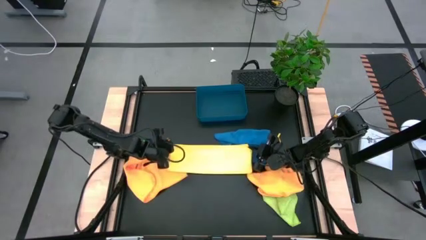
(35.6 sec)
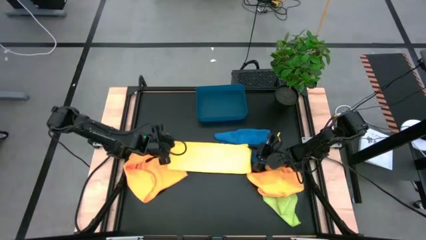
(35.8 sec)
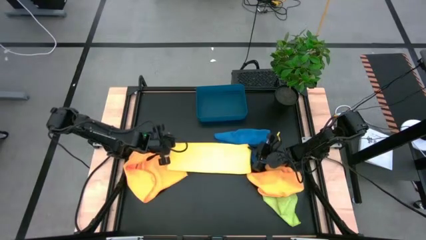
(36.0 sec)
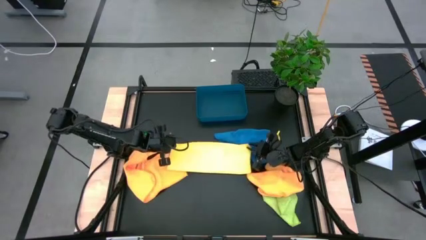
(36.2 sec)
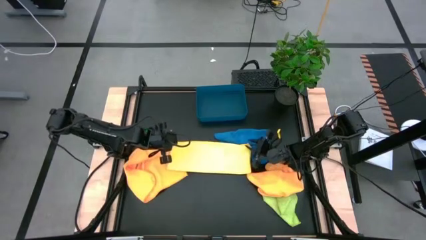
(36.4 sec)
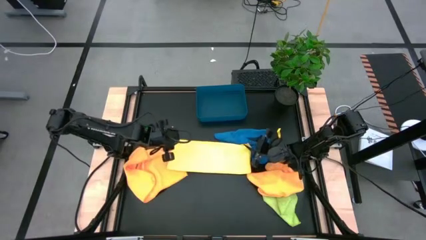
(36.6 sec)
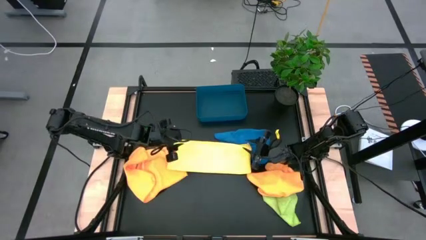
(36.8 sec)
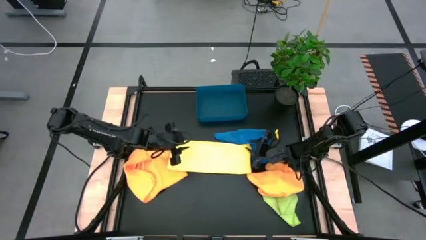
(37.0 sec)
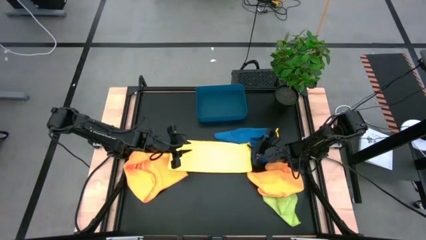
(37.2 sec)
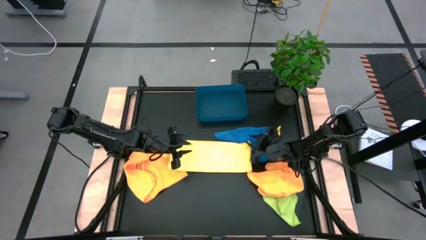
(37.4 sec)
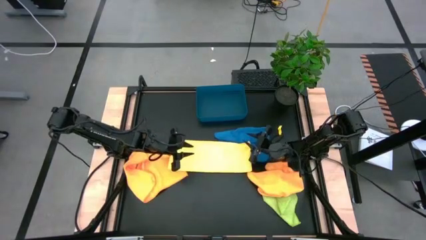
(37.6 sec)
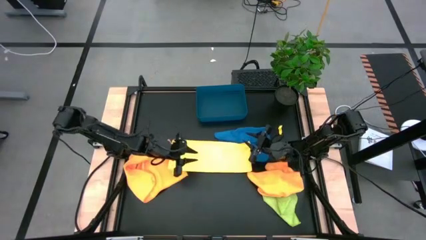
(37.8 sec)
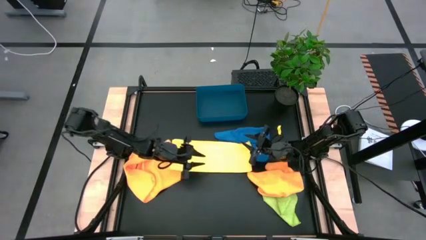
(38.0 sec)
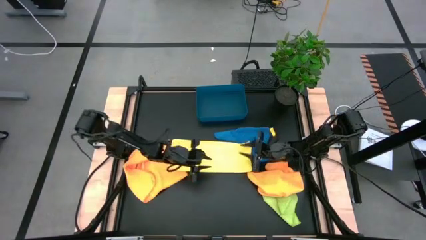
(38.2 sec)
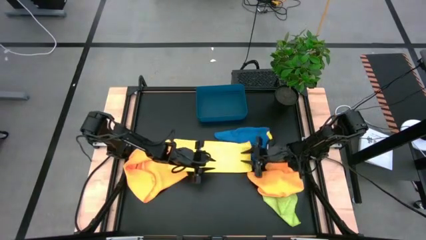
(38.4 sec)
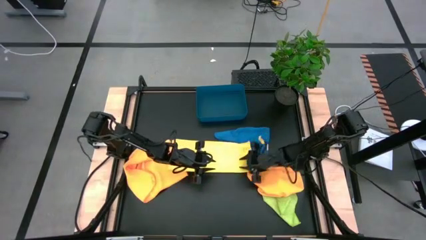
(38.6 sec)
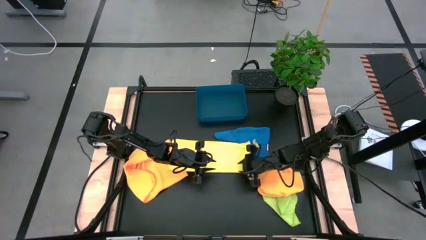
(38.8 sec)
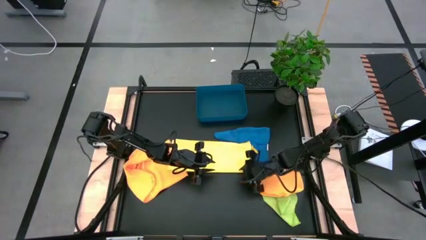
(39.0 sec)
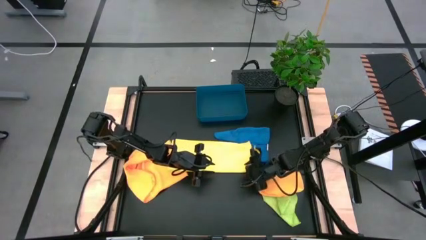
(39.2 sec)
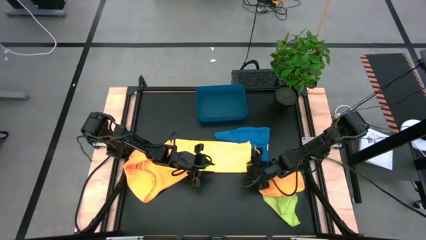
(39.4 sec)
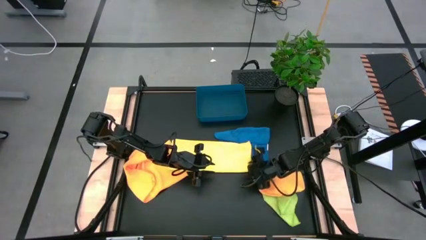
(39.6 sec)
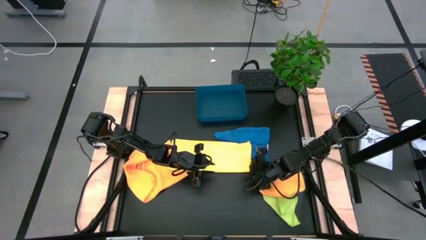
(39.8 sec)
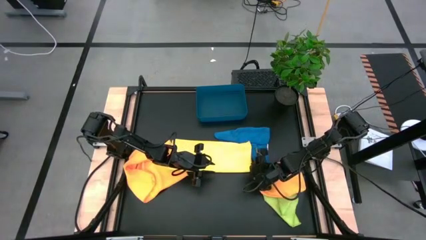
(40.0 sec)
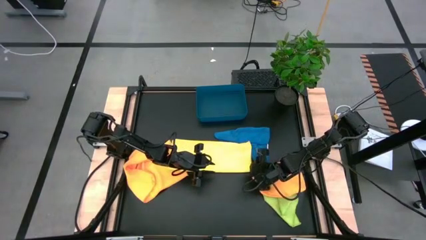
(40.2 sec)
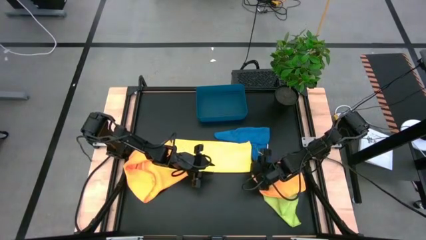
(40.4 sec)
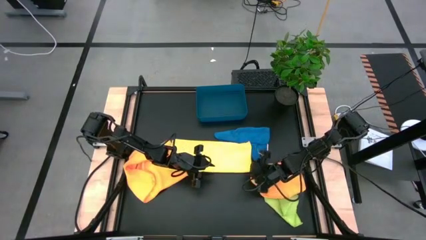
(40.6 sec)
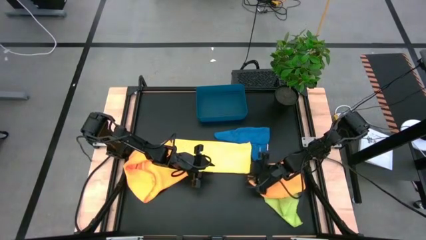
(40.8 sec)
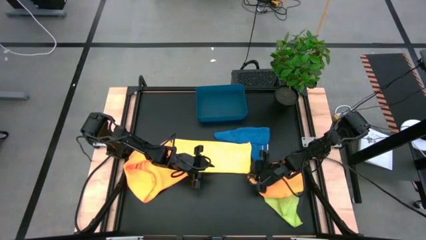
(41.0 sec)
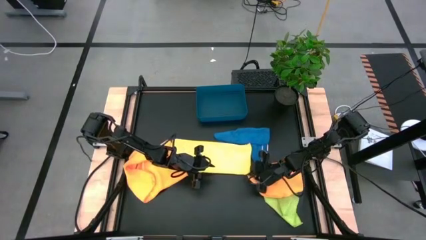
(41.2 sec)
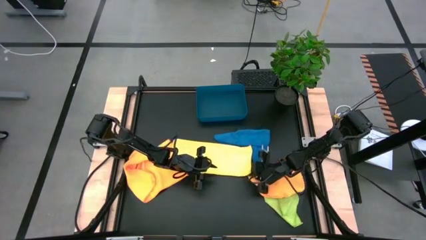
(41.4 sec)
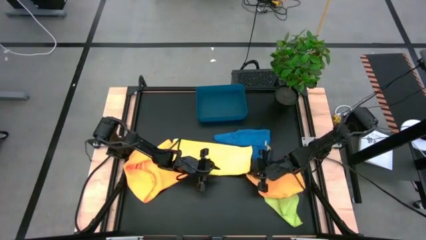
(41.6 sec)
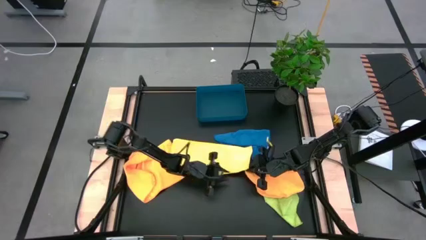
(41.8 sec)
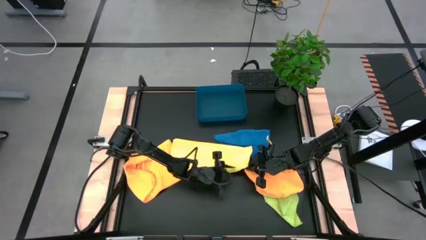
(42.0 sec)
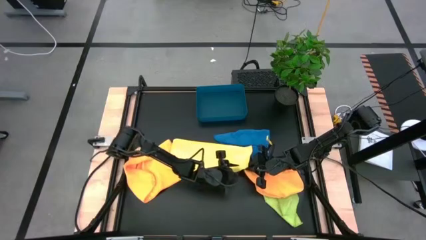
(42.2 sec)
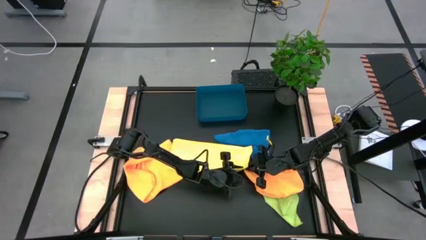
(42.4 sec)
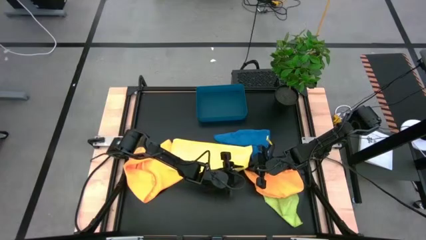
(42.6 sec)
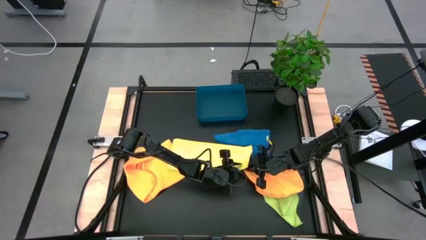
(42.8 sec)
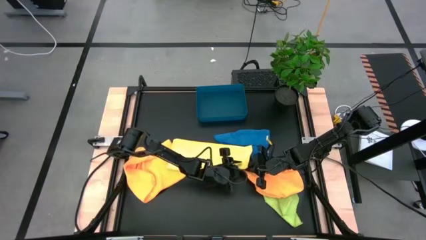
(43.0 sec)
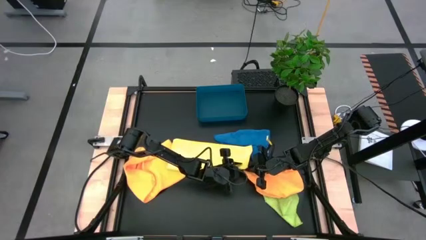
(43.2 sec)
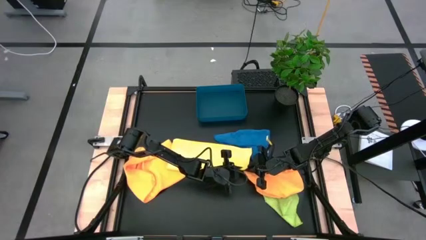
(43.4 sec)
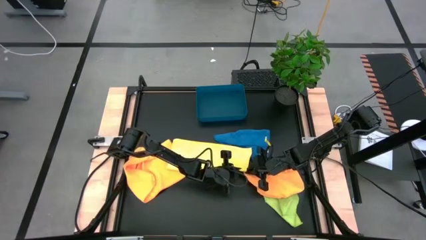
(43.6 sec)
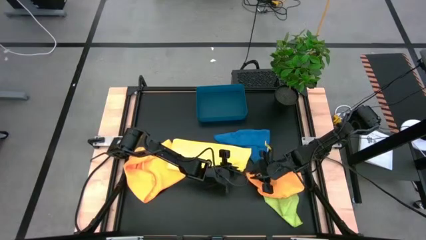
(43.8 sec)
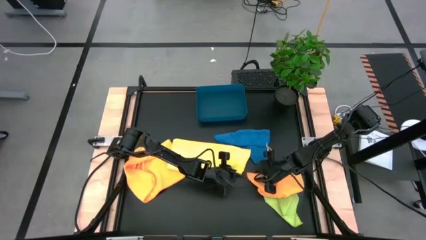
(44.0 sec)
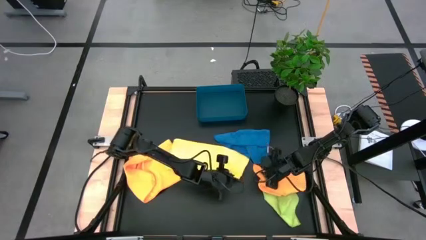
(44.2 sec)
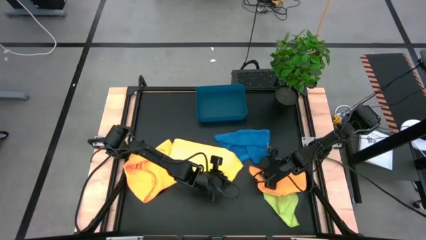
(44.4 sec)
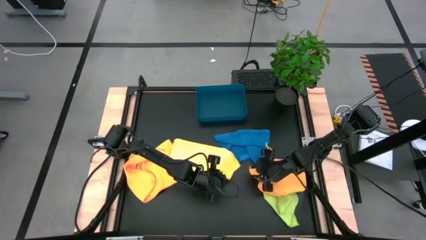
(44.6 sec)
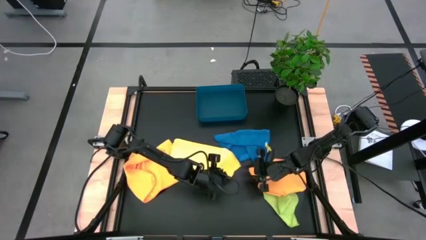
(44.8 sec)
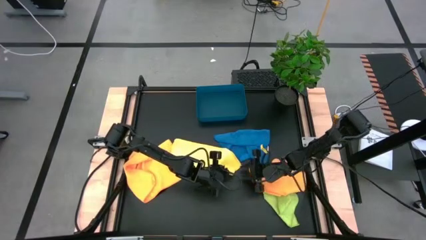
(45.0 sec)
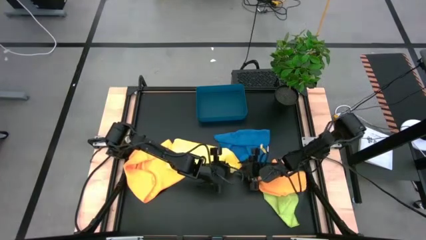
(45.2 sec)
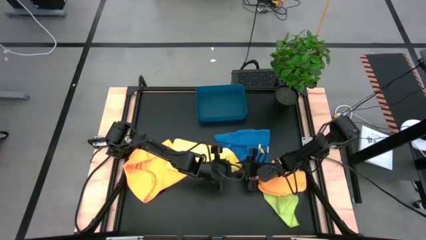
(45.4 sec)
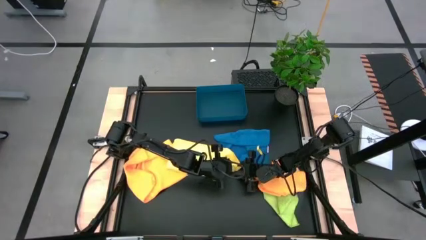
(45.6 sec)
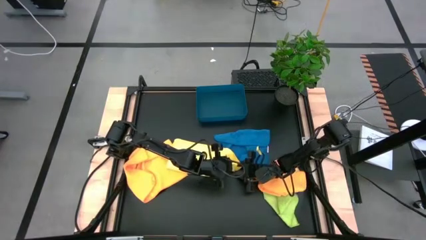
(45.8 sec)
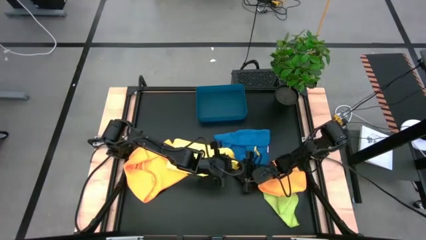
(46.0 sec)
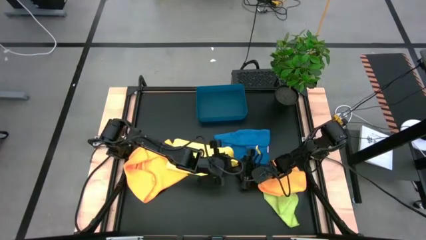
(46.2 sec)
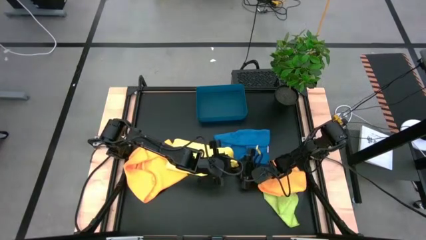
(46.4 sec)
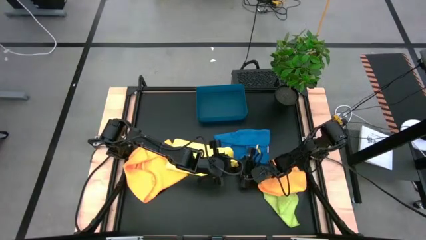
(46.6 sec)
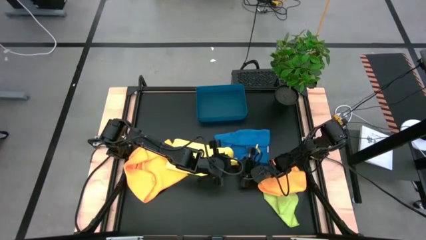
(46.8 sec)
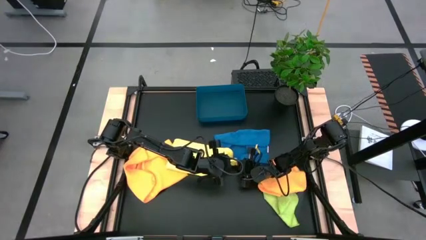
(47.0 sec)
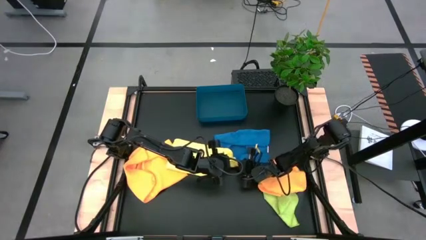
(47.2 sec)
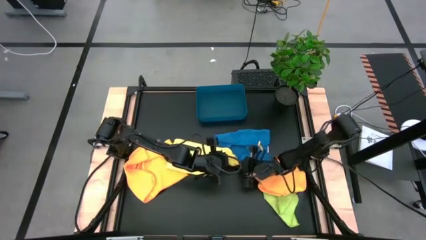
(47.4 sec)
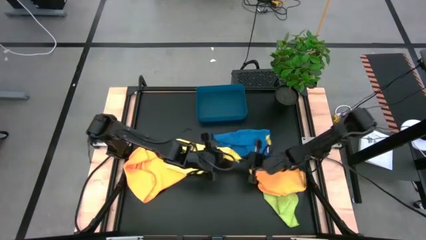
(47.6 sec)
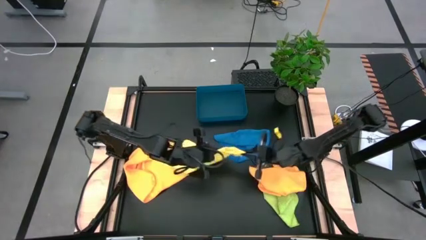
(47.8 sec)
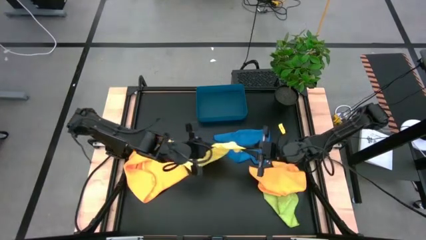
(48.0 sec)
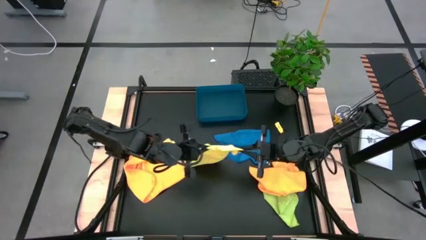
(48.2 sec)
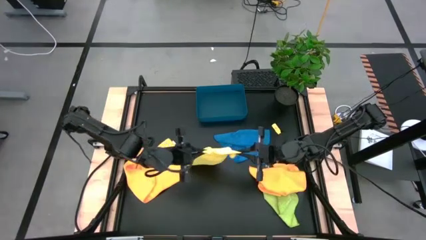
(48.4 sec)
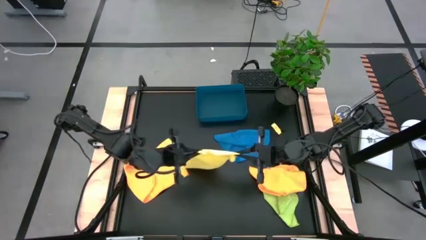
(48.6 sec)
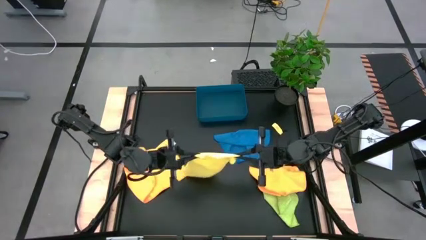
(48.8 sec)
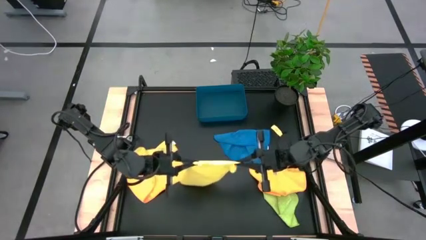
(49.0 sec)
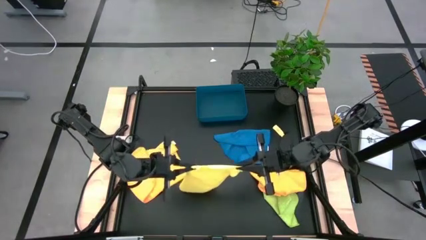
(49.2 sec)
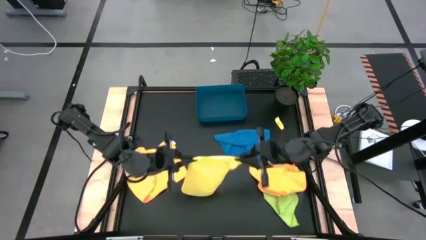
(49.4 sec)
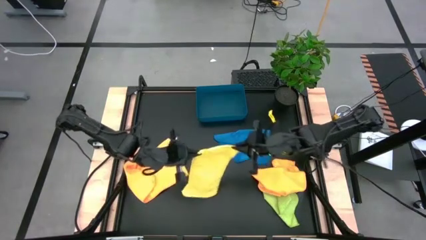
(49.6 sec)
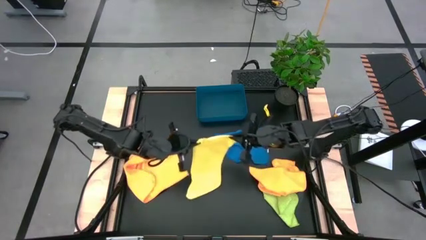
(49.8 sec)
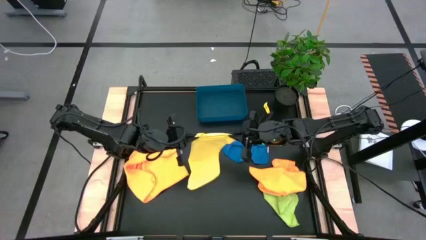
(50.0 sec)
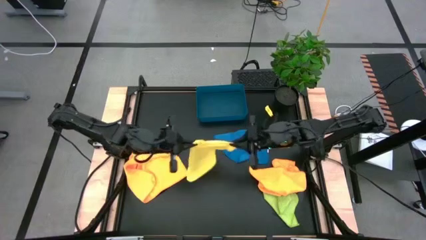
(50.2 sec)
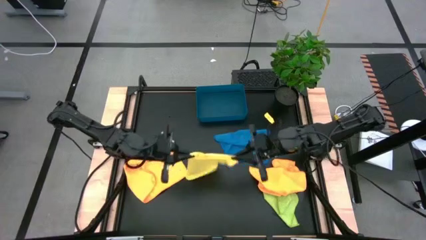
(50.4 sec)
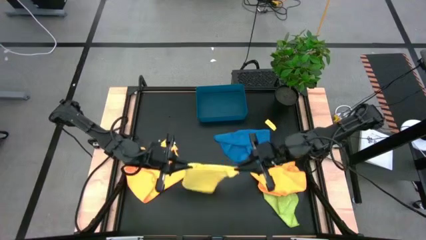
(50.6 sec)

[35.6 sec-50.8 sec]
Task: Fold microfiber towels
Fold the yellow microfiber towel

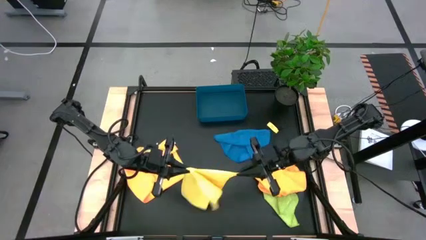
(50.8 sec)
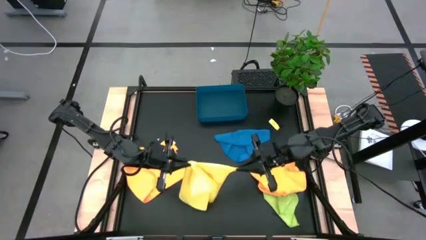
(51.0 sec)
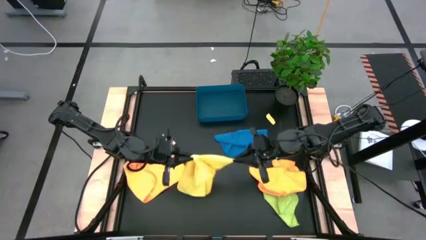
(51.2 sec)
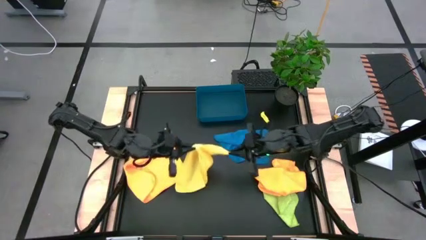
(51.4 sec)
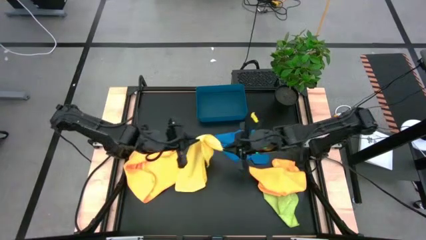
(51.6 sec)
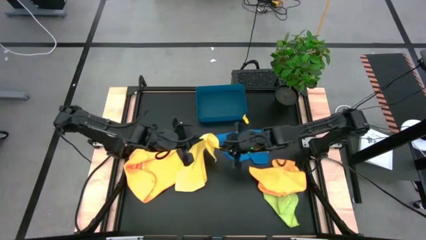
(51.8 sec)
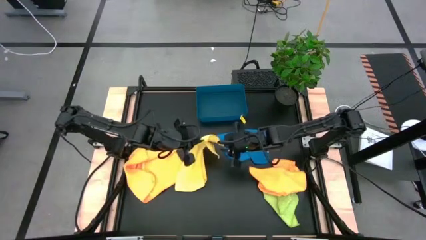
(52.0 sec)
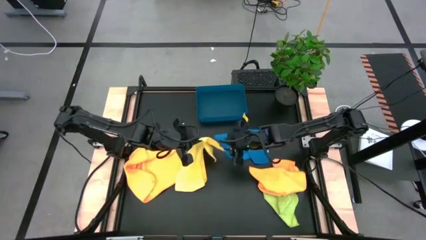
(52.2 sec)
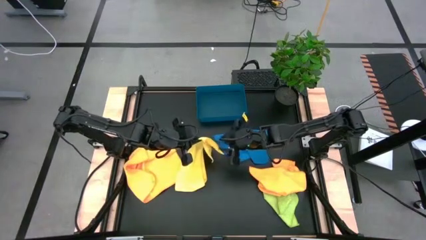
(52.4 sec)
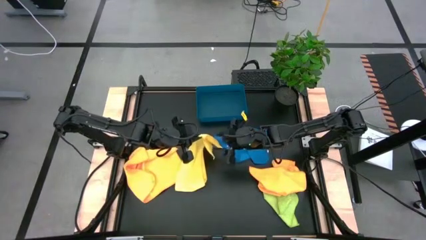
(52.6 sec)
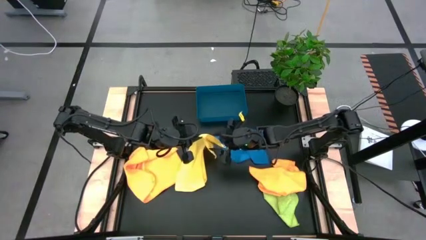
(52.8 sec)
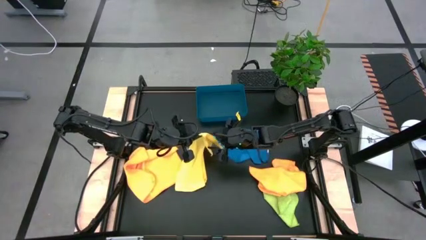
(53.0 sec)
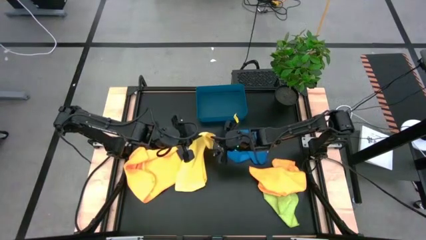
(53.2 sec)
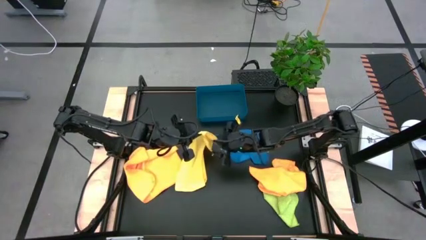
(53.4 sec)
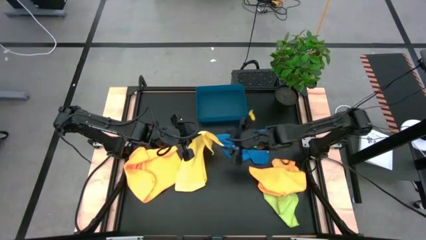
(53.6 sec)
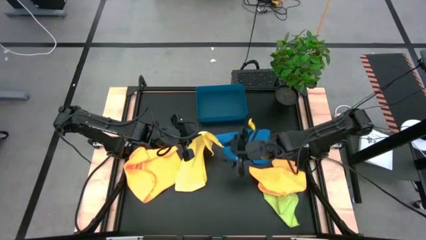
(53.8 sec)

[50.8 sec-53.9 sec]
Fold the yellow microfiber towel
